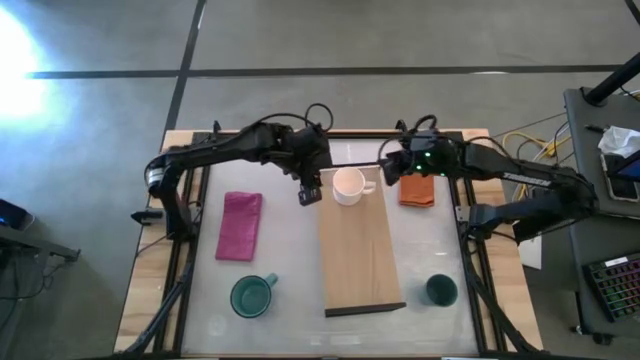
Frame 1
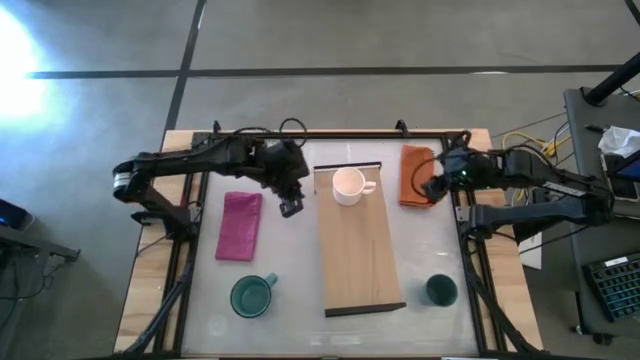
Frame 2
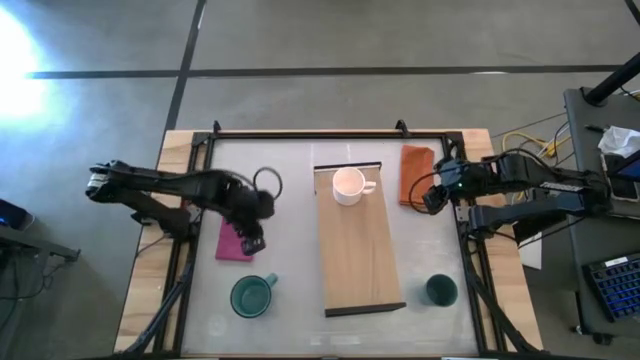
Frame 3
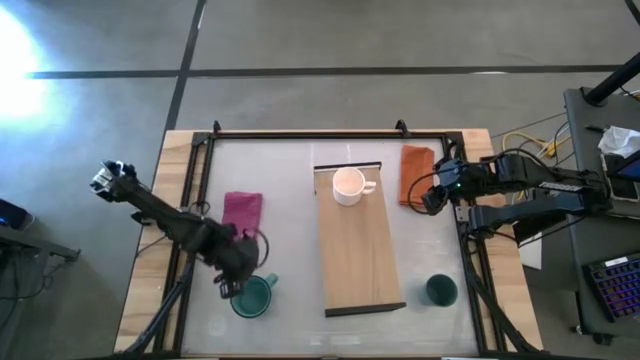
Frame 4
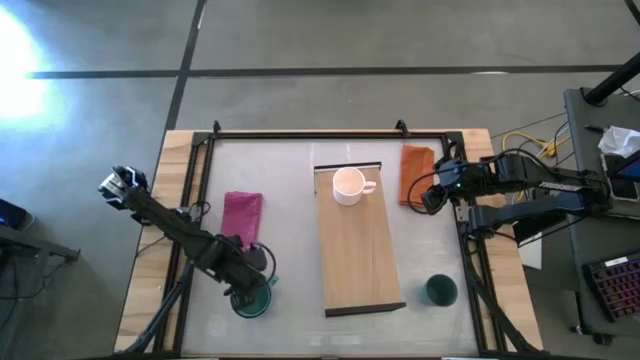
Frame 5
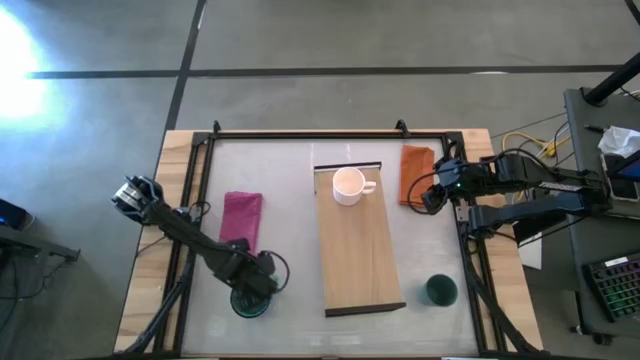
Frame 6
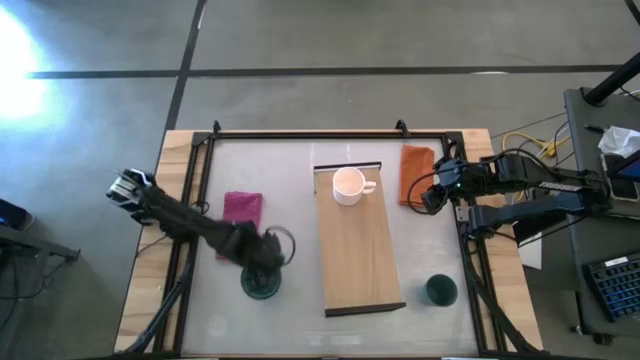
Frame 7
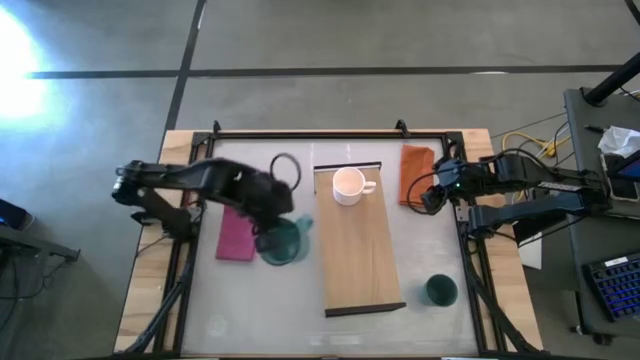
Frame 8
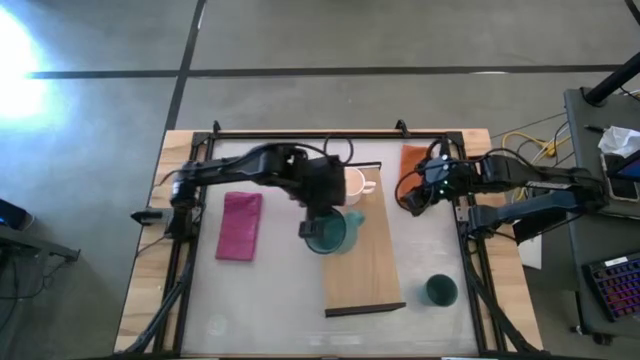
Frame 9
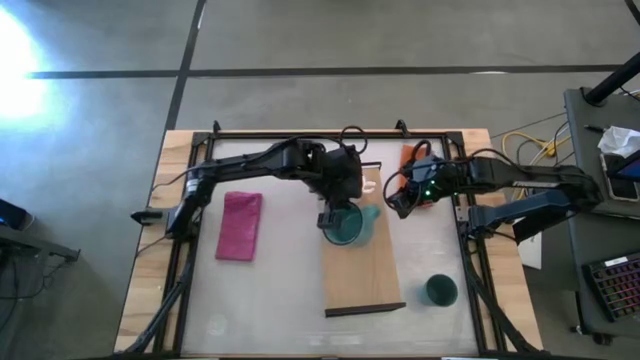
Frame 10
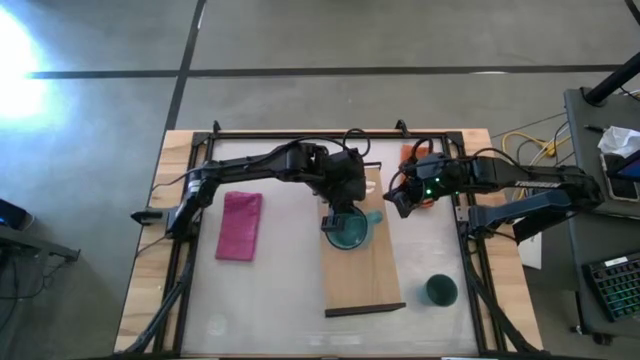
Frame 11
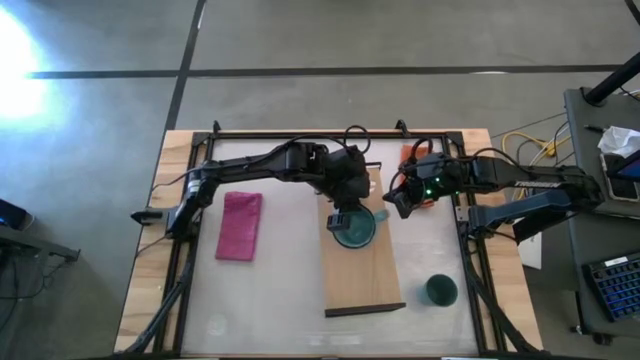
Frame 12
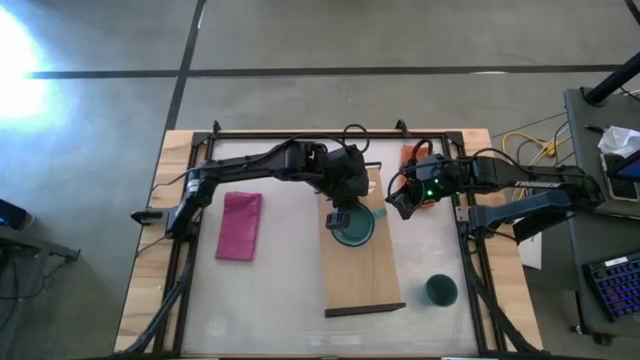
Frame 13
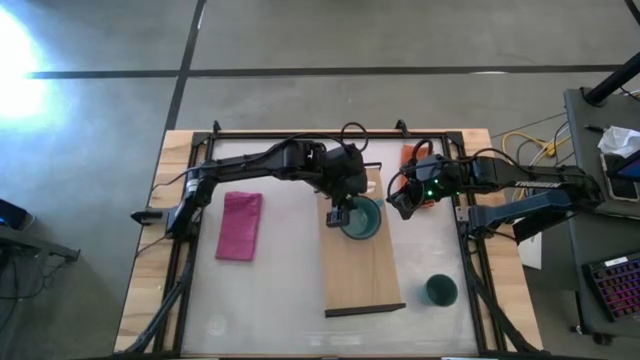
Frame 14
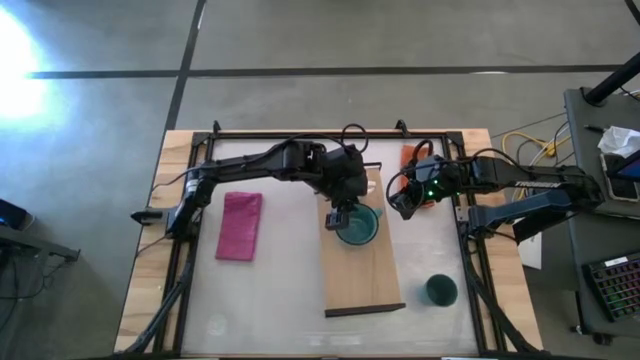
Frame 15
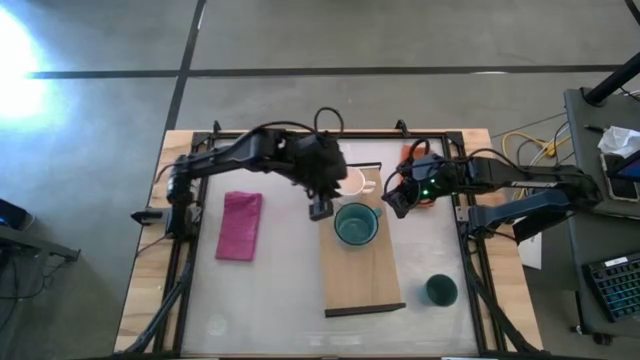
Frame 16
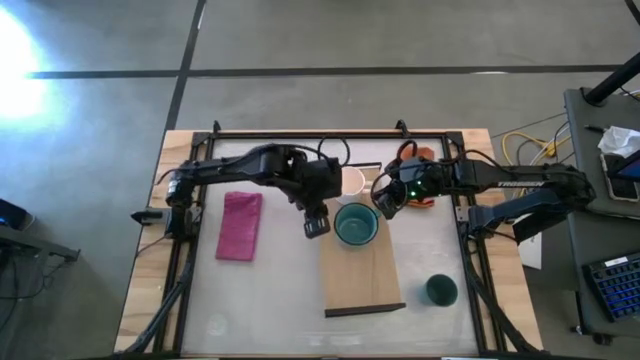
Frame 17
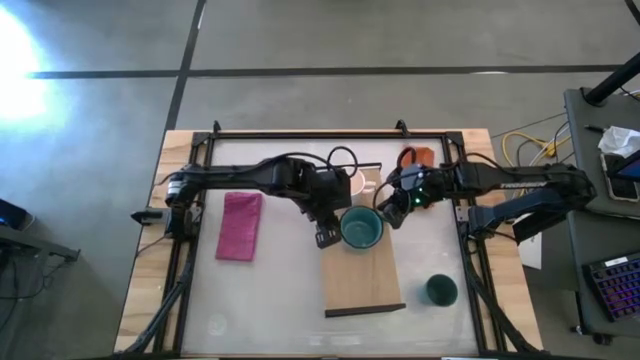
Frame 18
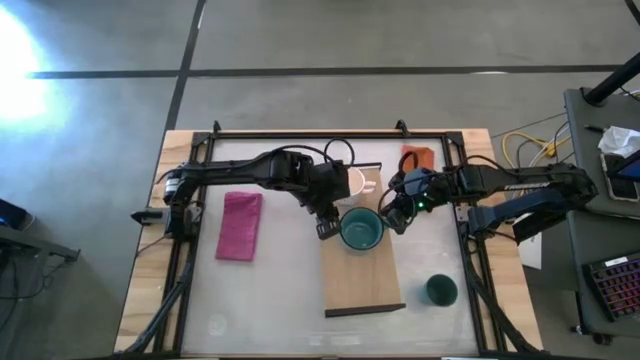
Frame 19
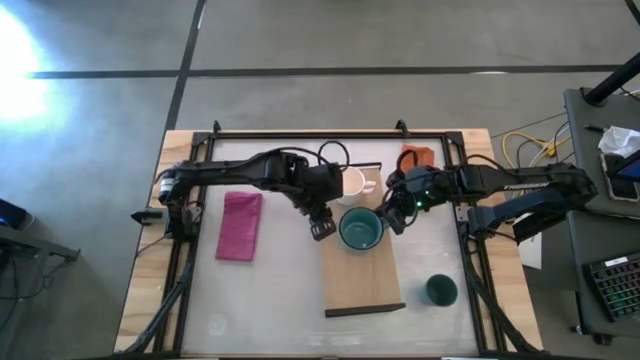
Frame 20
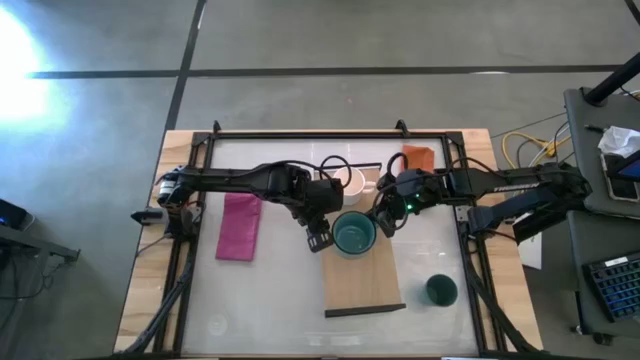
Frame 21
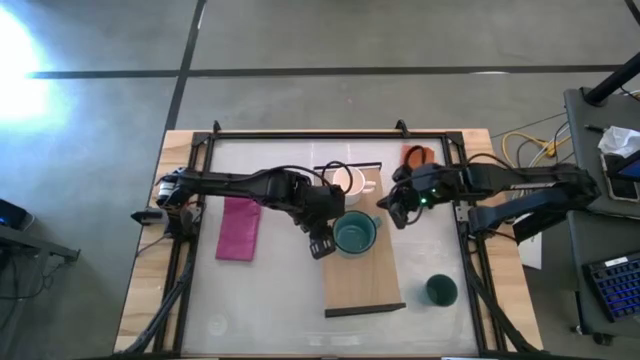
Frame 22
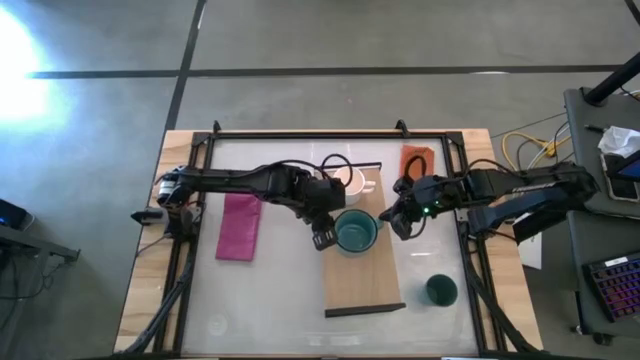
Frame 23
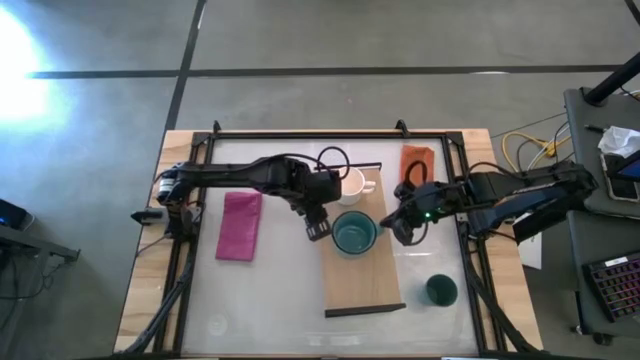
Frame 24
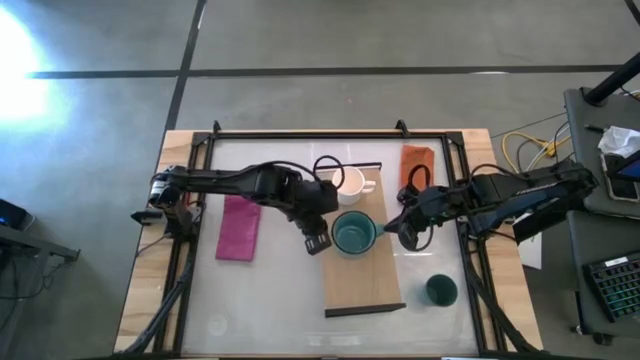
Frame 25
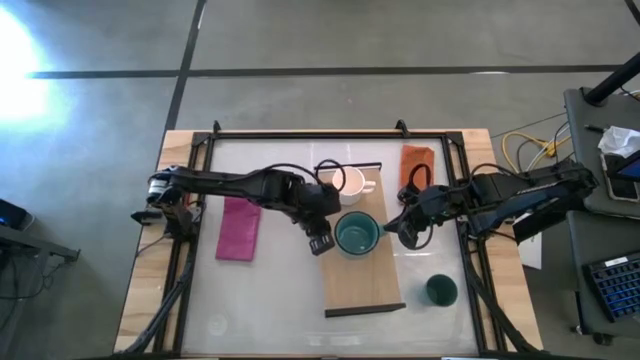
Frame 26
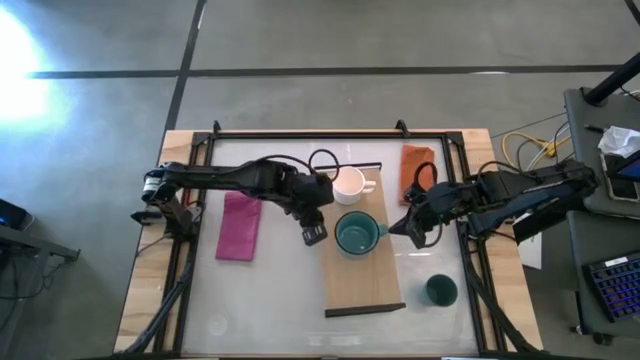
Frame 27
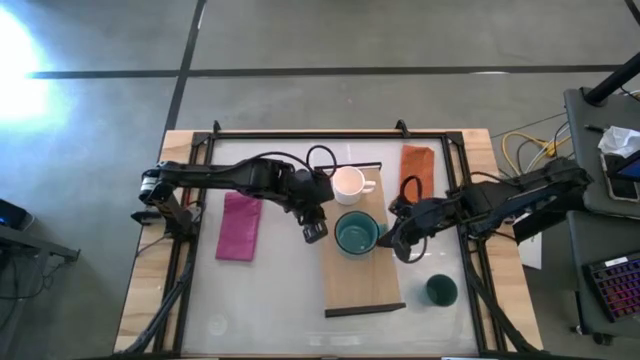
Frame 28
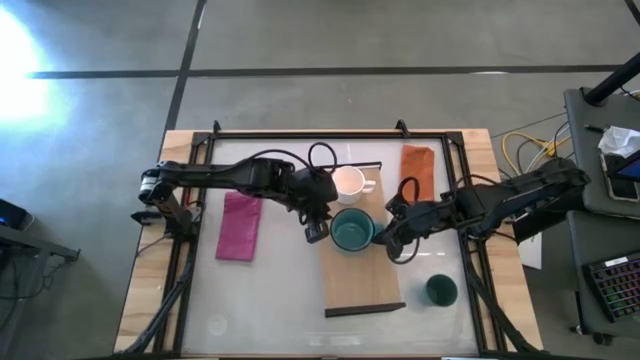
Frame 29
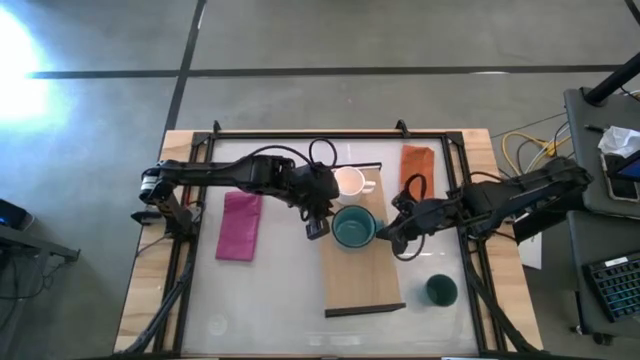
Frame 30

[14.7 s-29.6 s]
Task: Stack small to large cups/mugs on shelf
Put the blue mug on the shelf

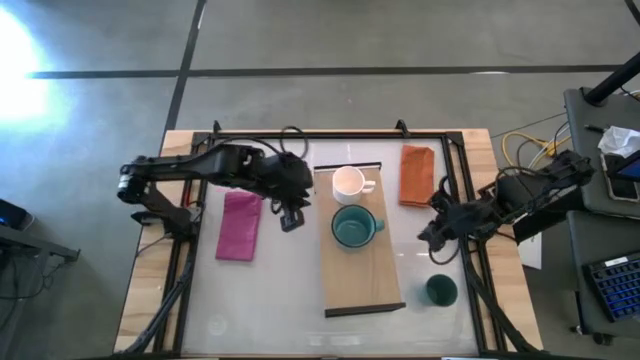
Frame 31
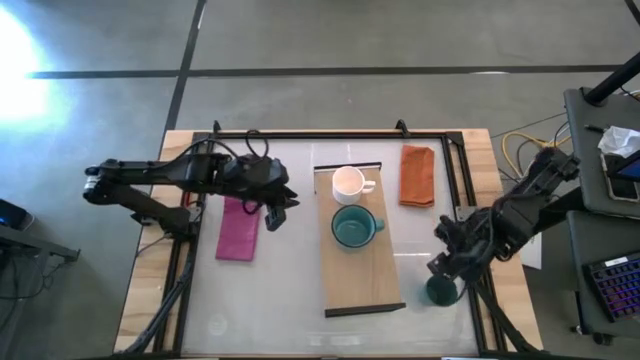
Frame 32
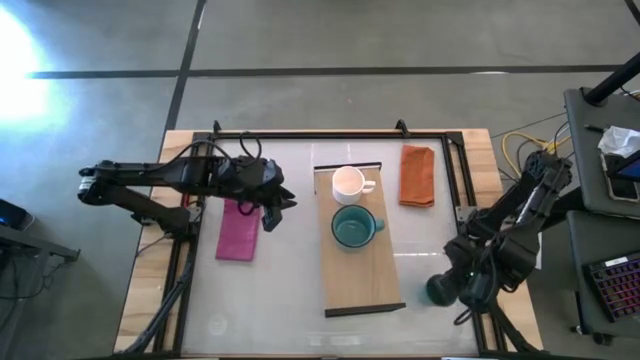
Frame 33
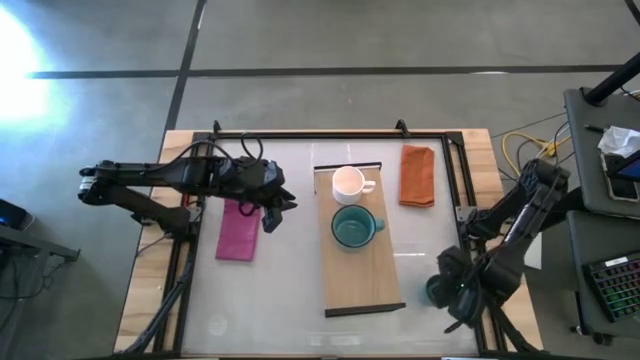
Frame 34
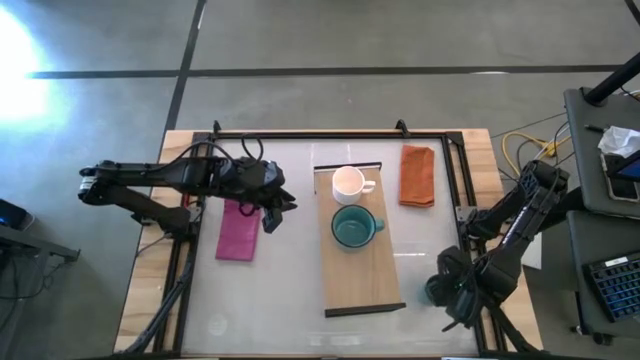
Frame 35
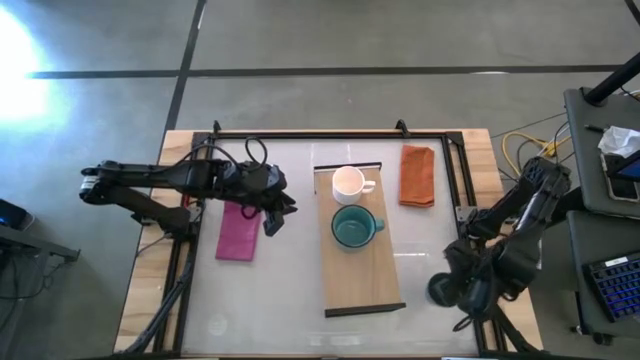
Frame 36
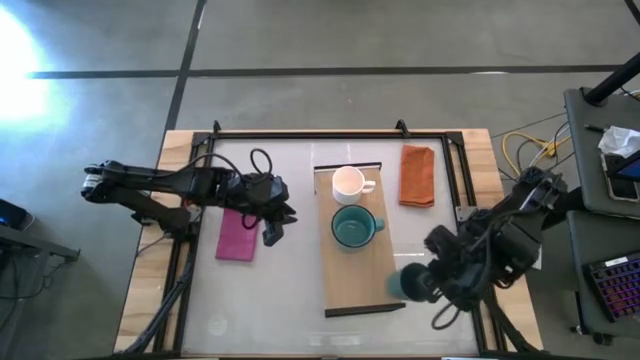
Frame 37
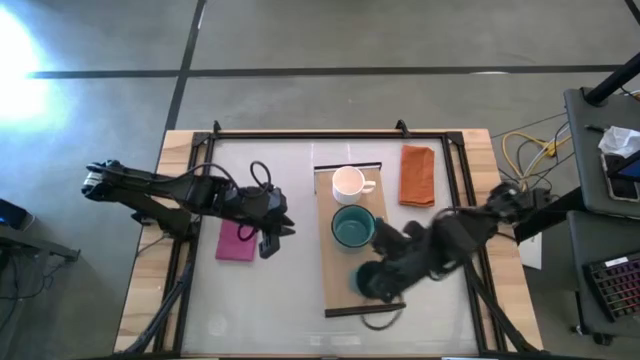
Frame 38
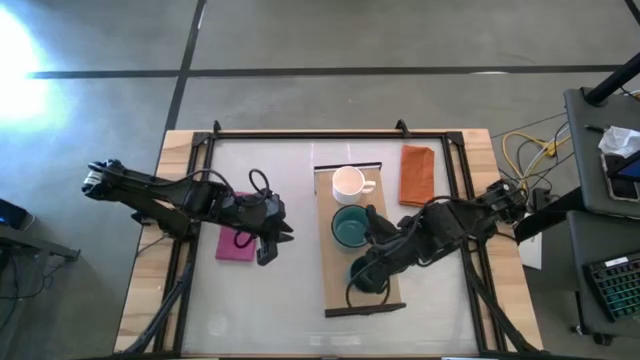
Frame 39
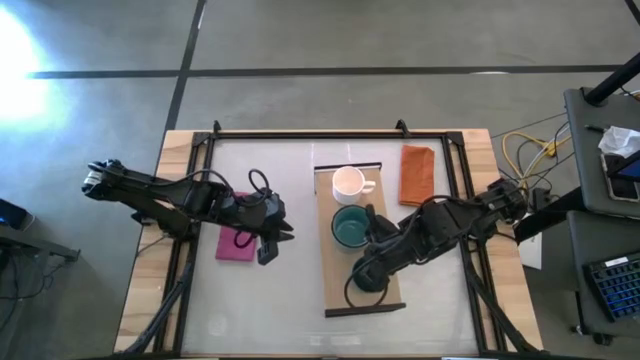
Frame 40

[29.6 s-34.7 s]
Put the blue cup on the shelf

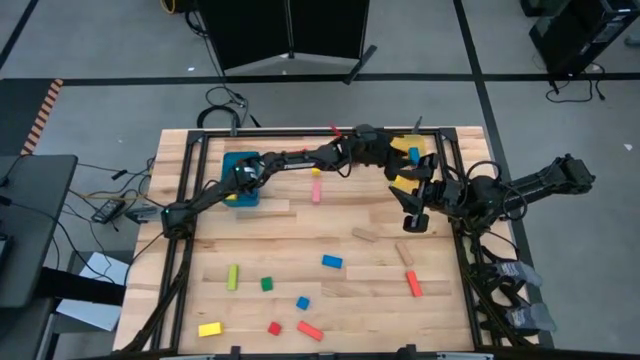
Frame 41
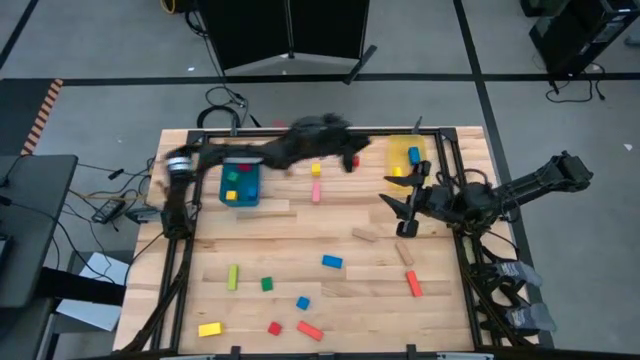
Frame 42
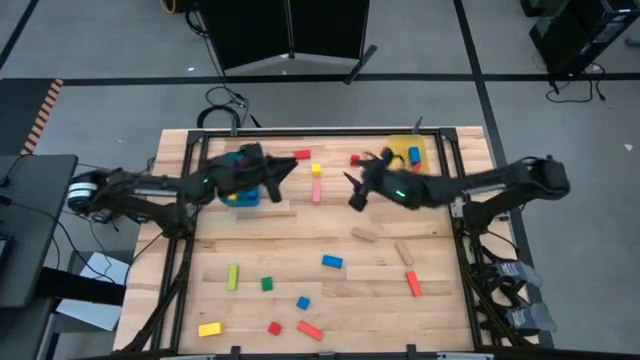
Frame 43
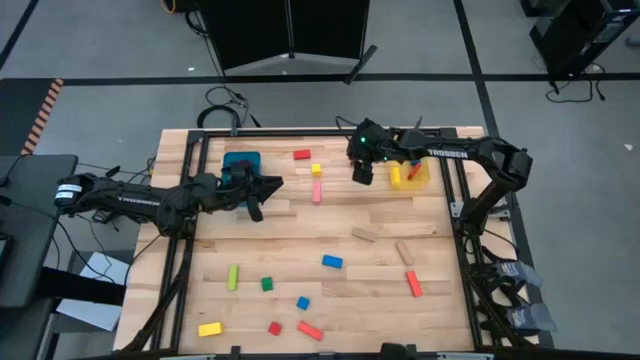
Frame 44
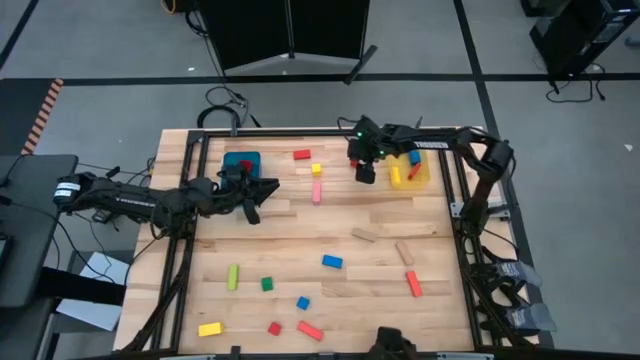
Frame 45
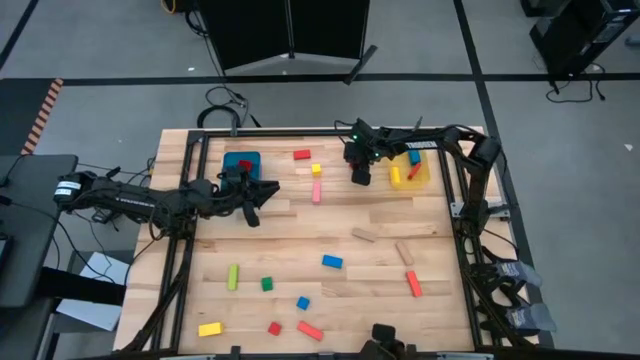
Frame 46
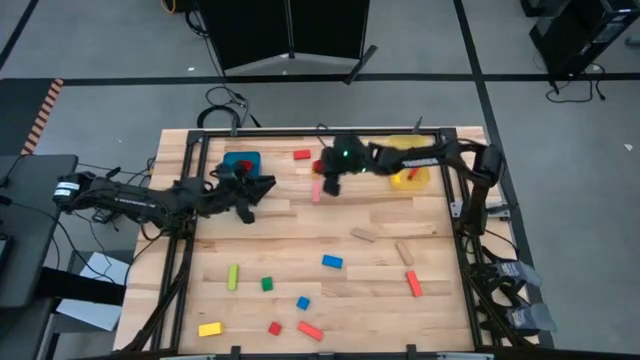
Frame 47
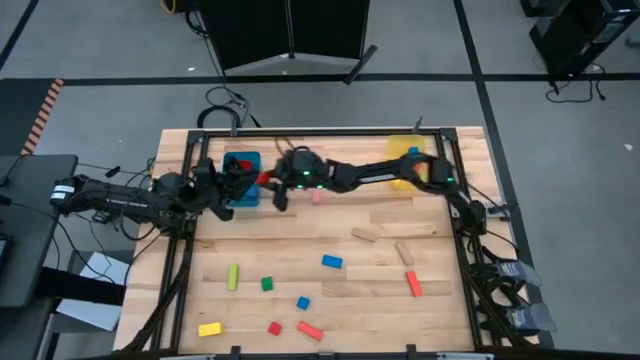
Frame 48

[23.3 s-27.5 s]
Task: Sort blocks by size
Put the small red block into the blue bin
